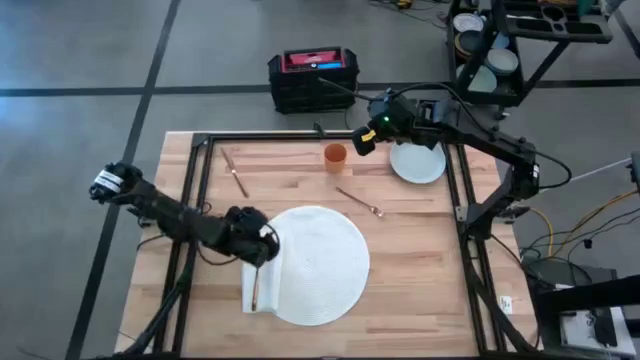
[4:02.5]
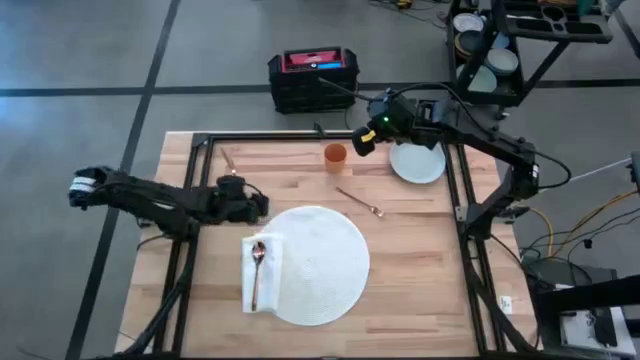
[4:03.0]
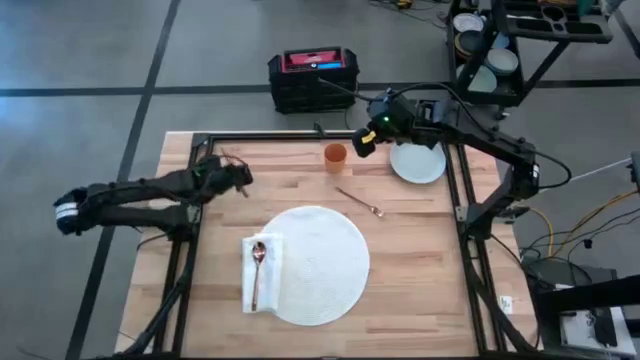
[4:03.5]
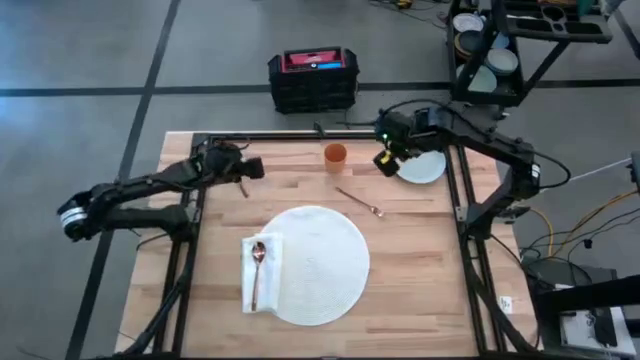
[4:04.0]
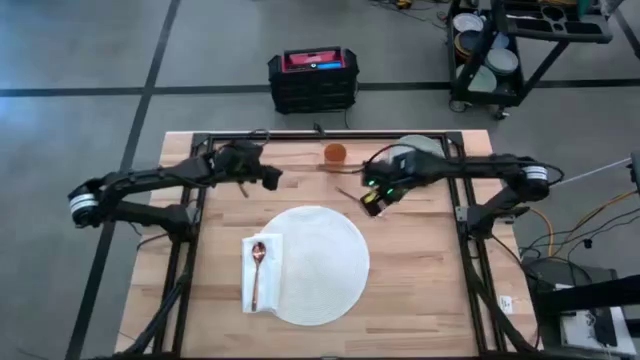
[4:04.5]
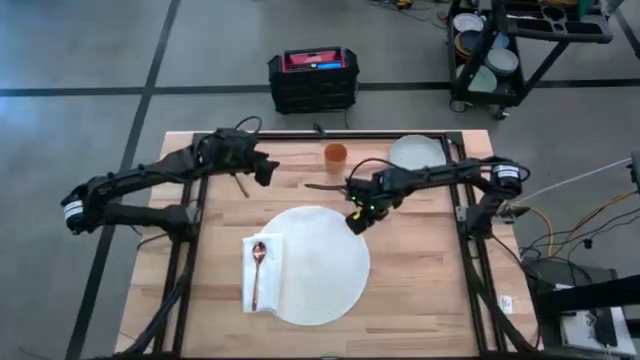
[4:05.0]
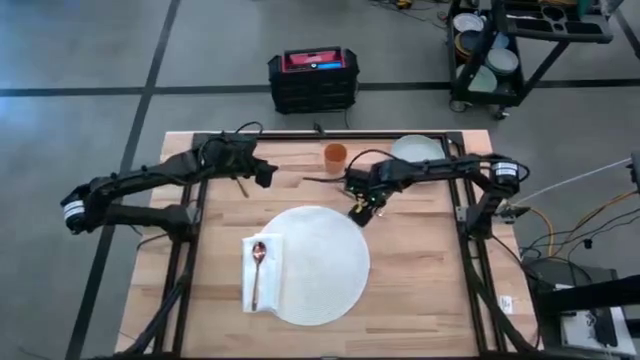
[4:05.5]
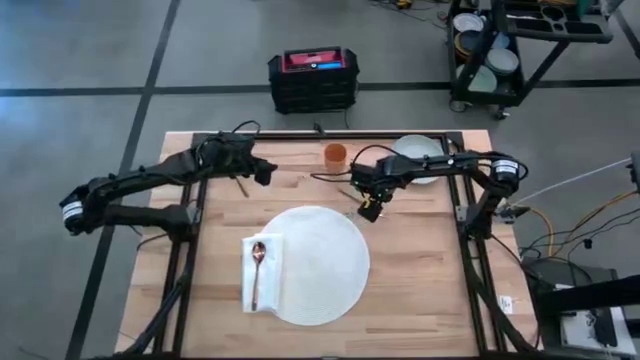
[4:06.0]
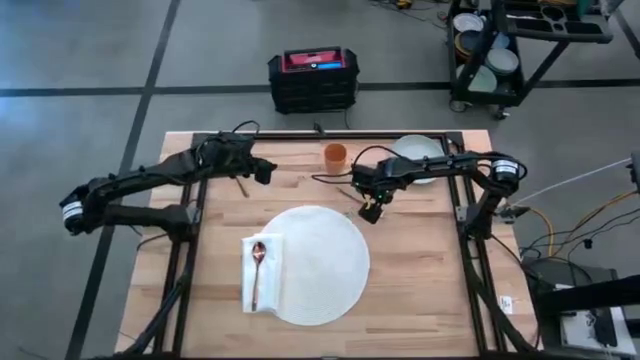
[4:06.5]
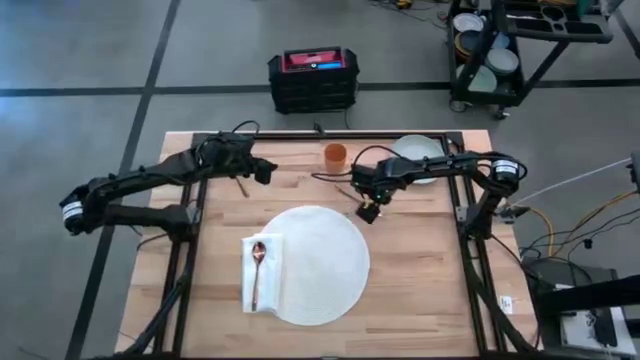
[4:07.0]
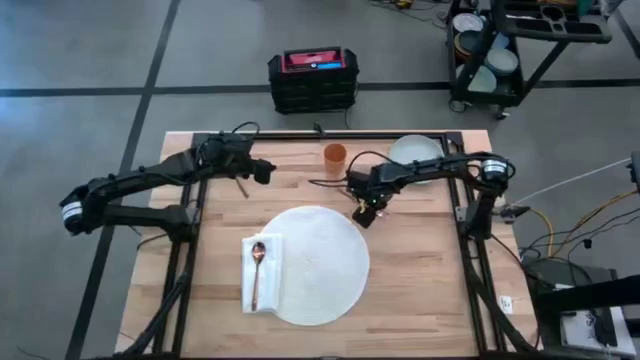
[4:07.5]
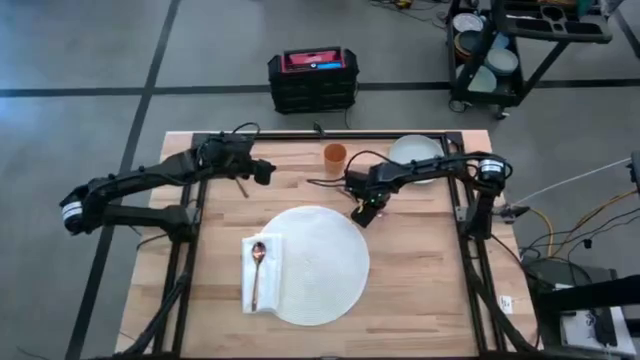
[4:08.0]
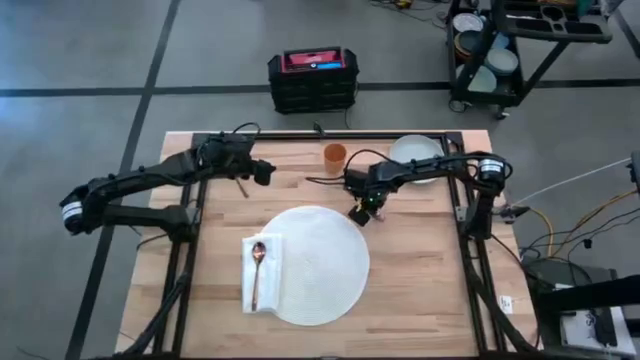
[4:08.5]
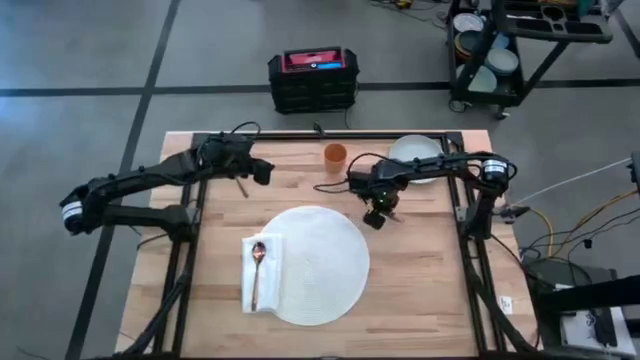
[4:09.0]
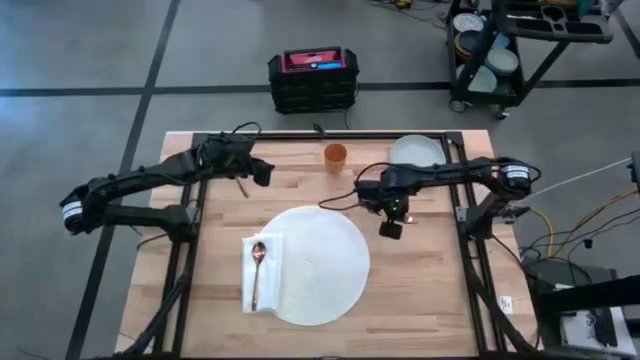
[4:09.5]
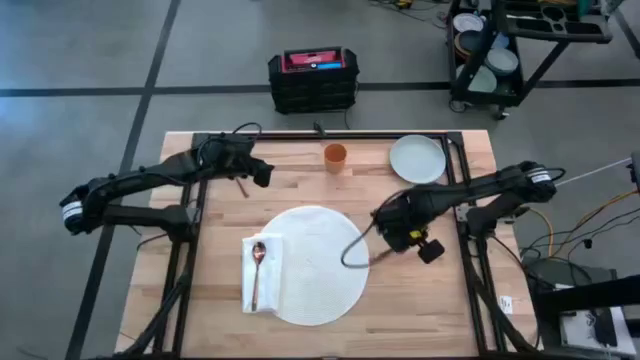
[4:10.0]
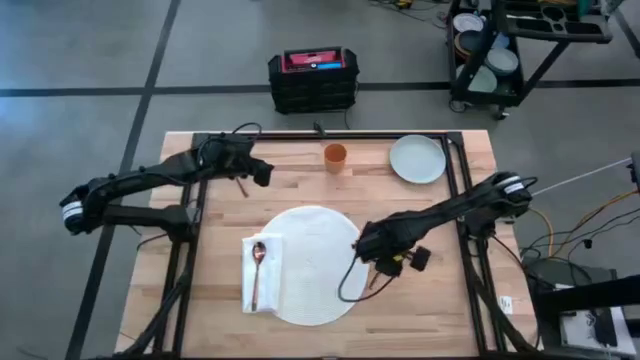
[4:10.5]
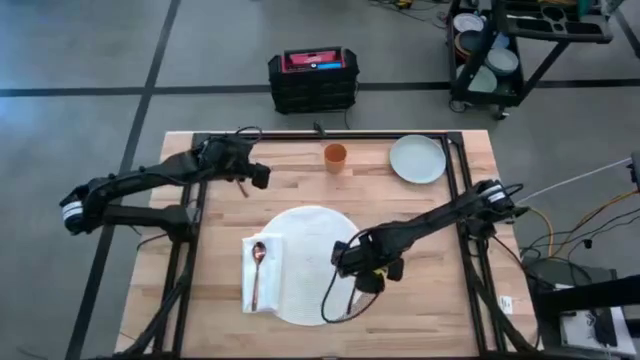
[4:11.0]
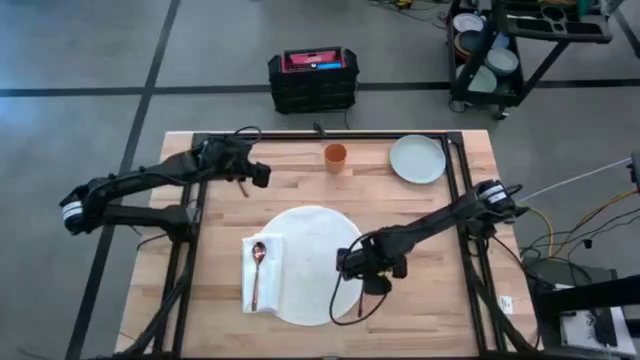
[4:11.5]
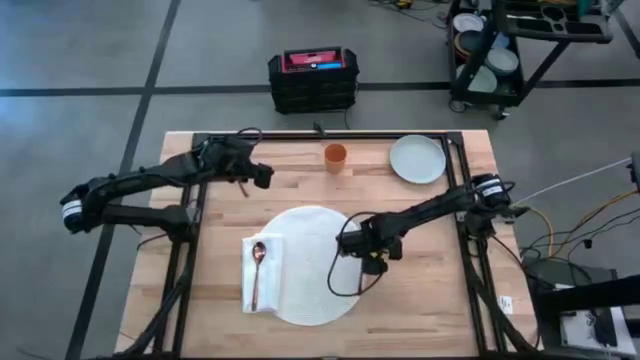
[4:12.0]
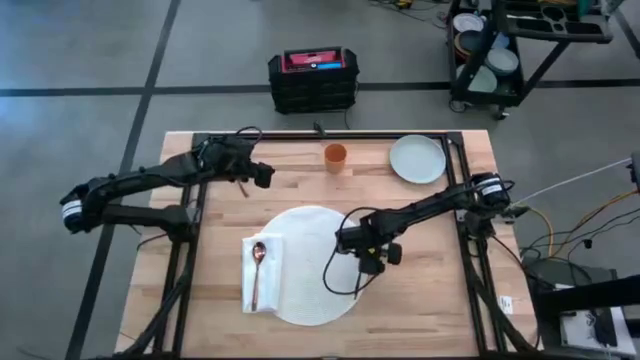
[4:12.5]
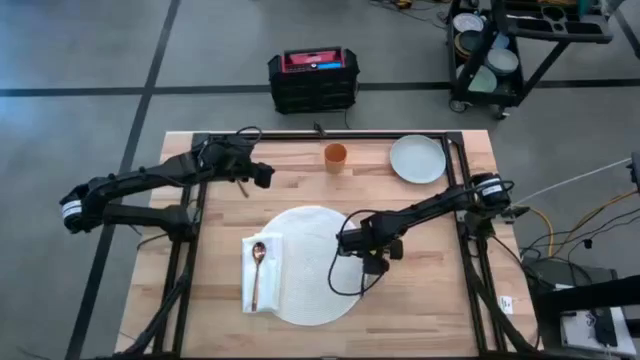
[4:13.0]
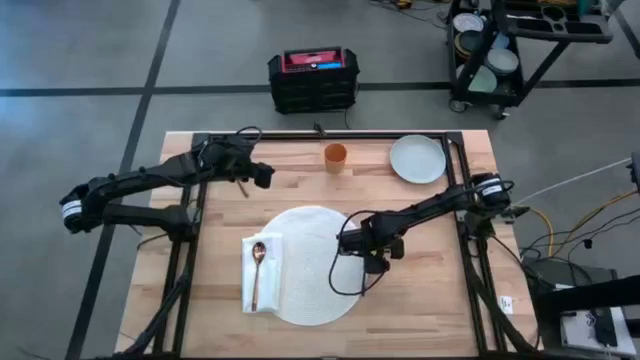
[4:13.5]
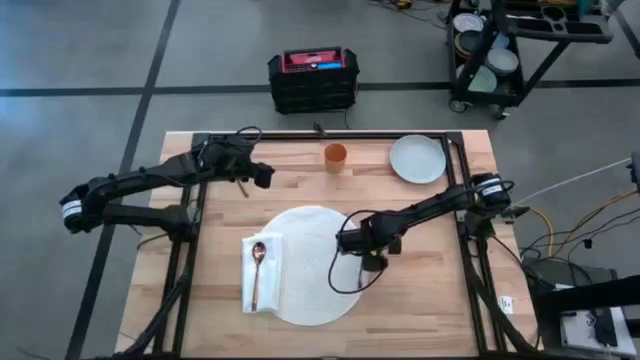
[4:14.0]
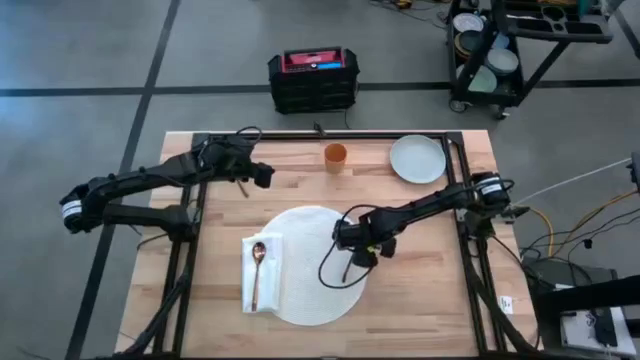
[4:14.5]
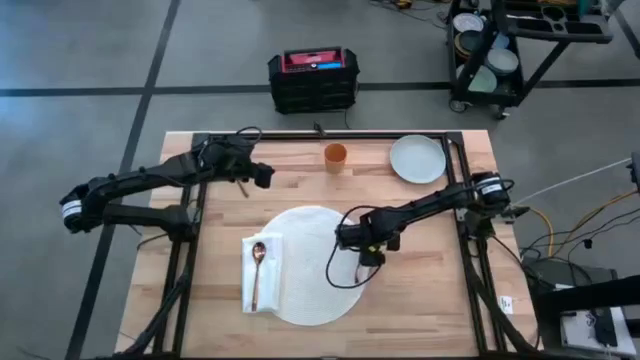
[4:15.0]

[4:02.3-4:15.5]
Task: Set table place
Put the gold fork on the white mat

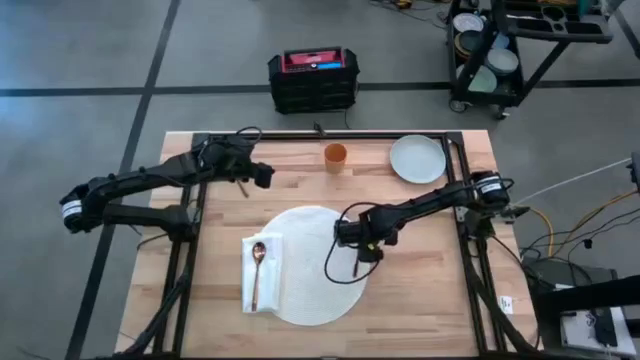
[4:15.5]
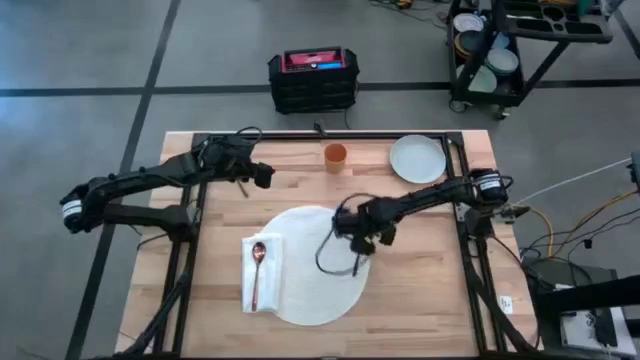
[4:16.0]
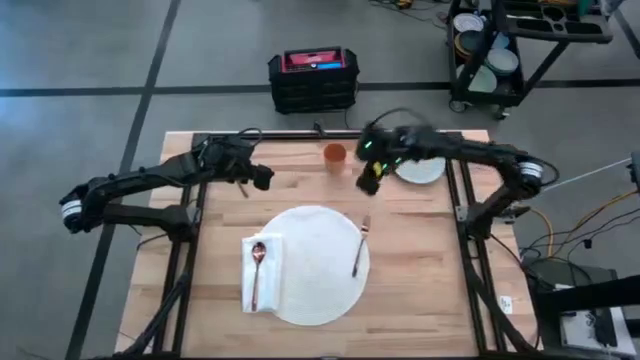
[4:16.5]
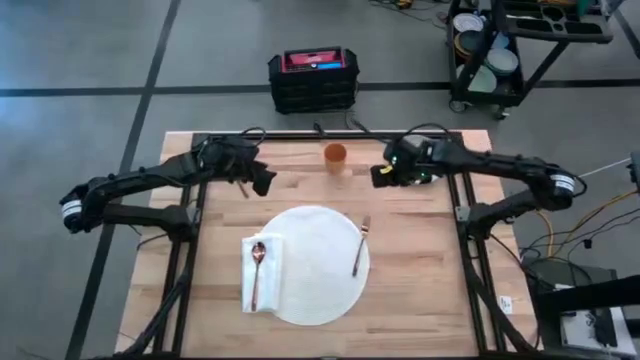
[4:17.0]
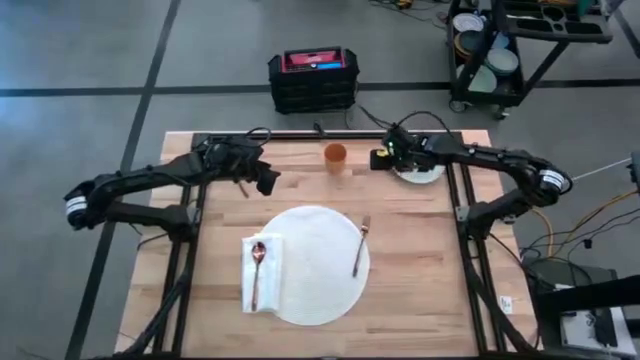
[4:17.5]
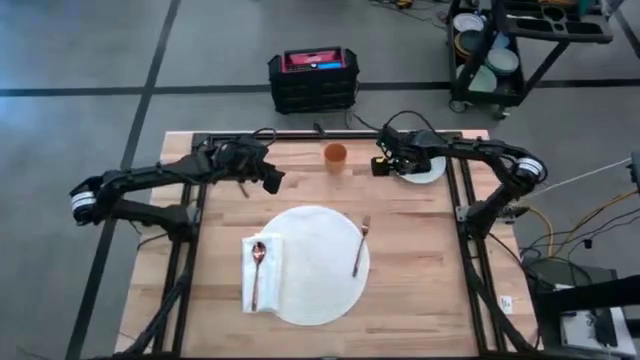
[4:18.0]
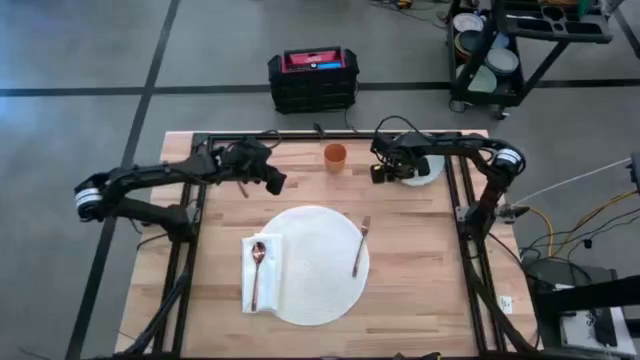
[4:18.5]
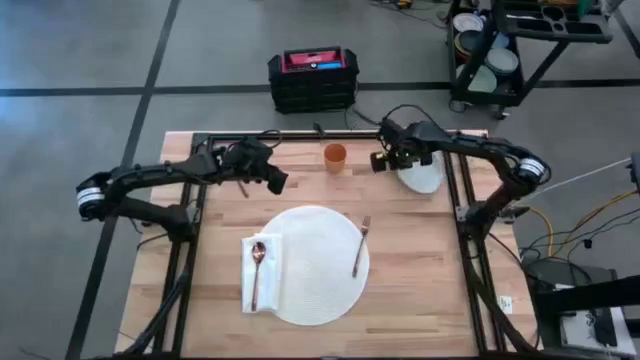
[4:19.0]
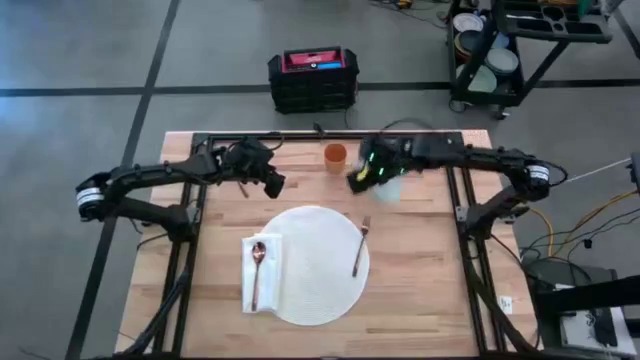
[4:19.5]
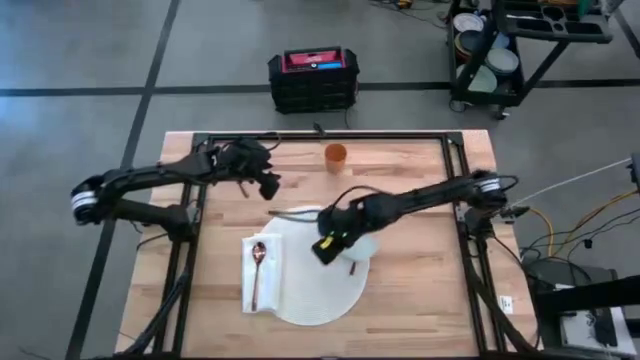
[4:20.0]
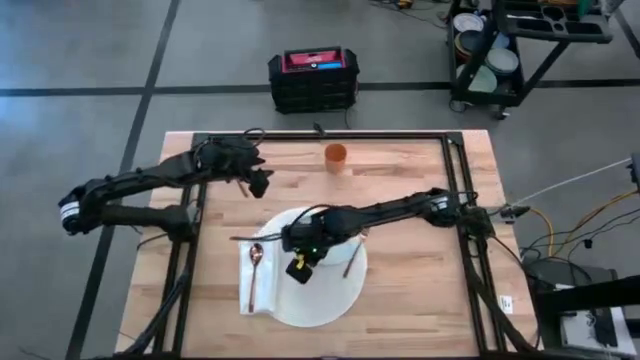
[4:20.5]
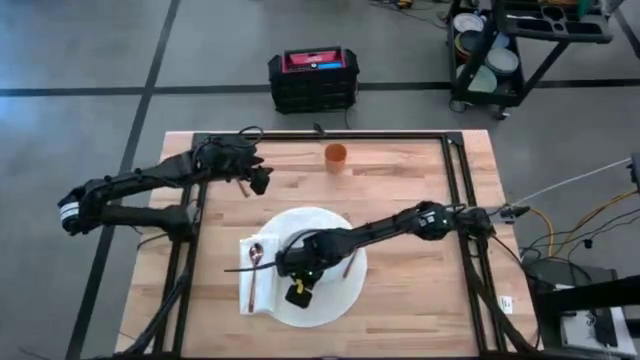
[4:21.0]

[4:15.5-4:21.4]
Put the gray plate on the white mat

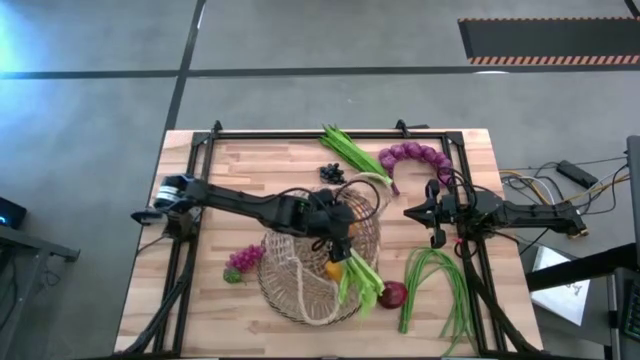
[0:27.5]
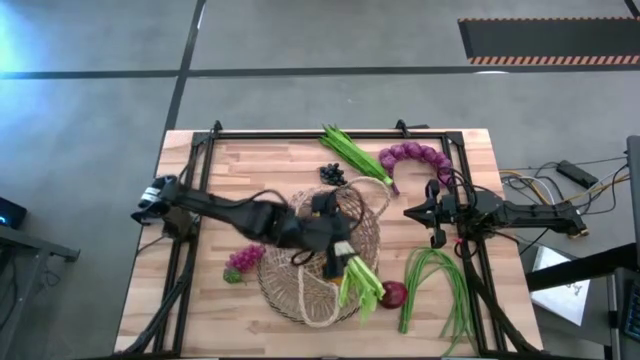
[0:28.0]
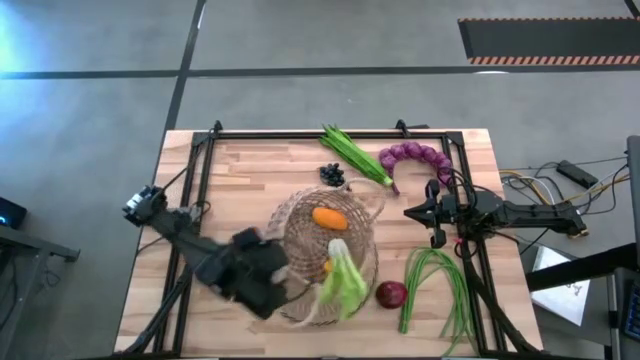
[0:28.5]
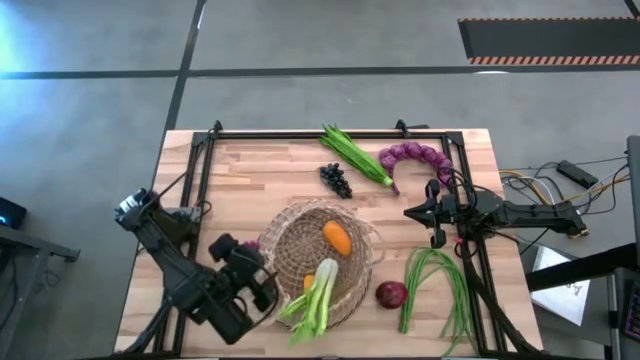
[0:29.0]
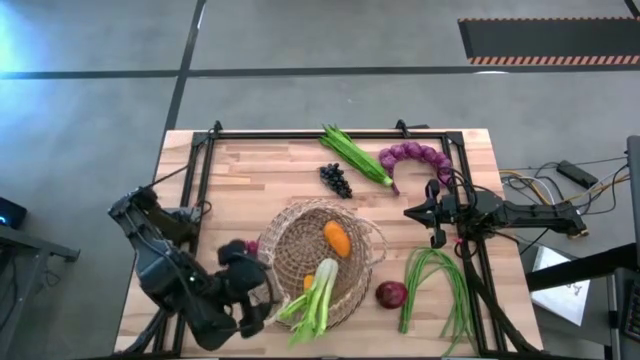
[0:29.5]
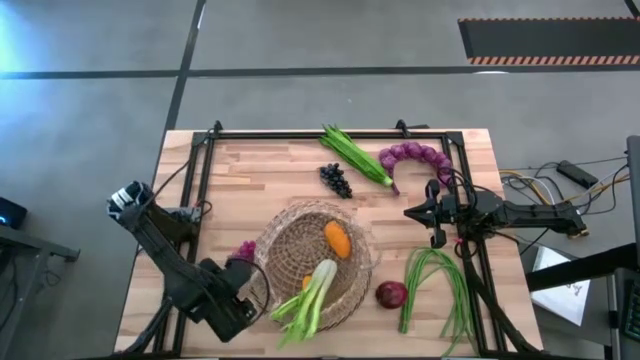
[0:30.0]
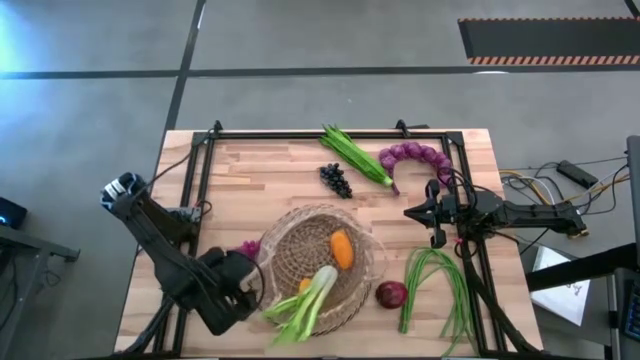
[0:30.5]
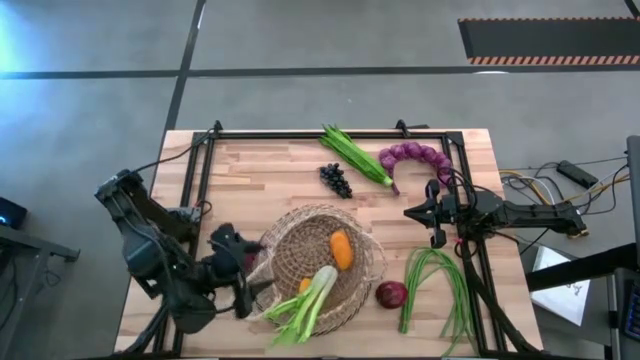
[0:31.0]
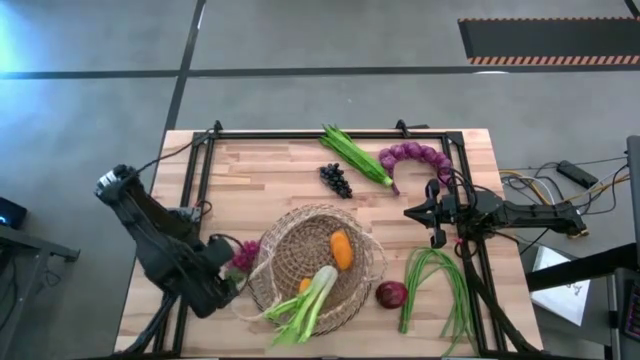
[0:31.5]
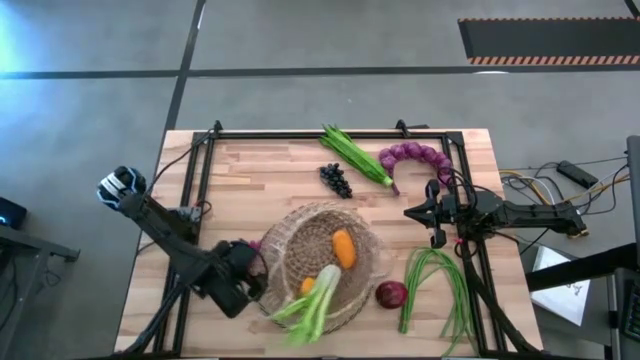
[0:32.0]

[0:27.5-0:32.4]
Task: Build produce basket
Adjust the basket
